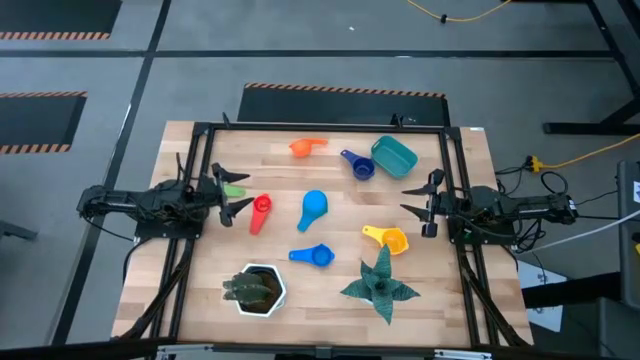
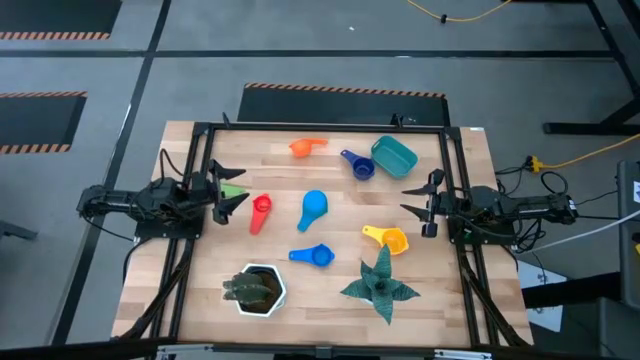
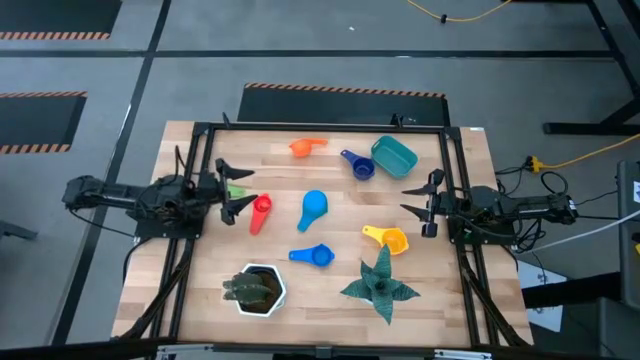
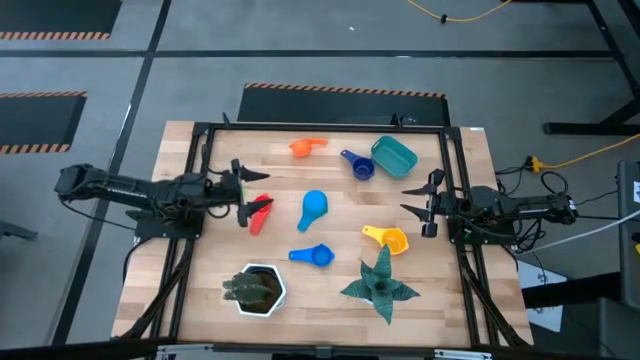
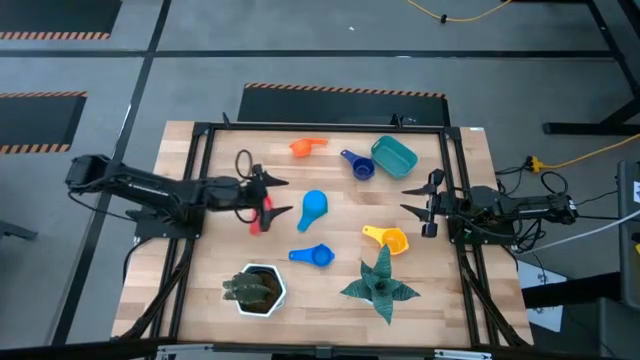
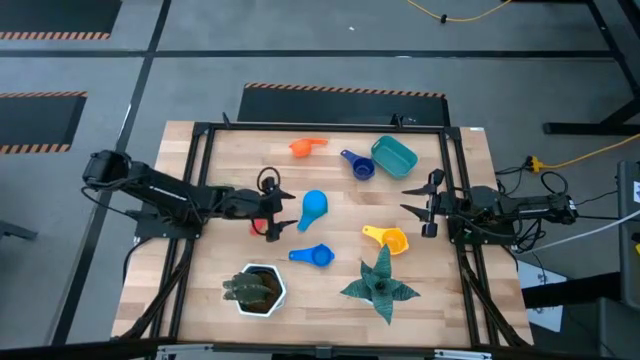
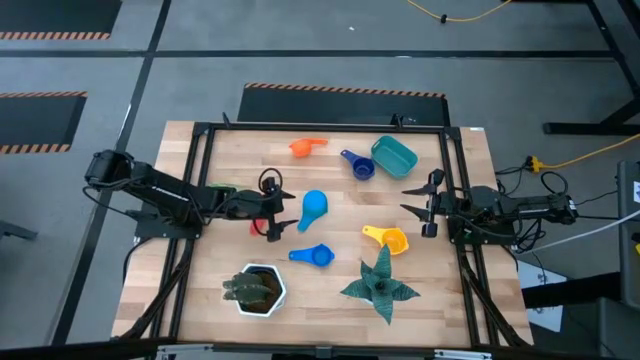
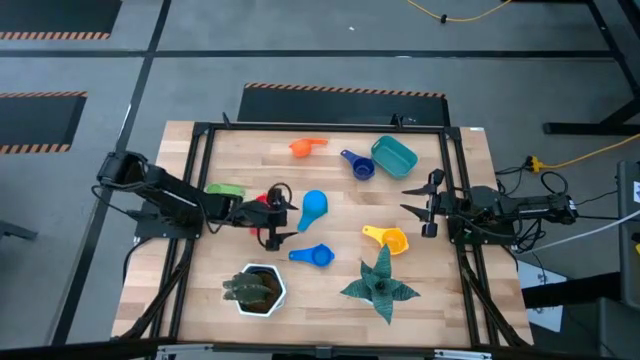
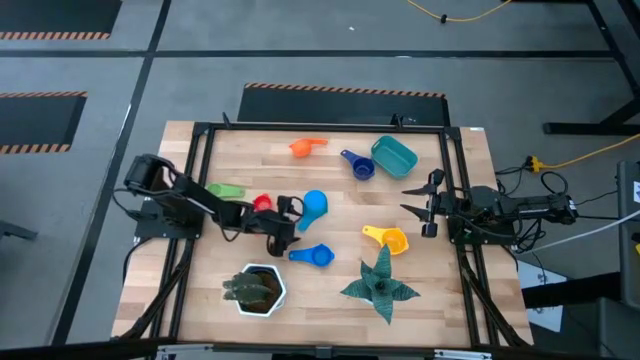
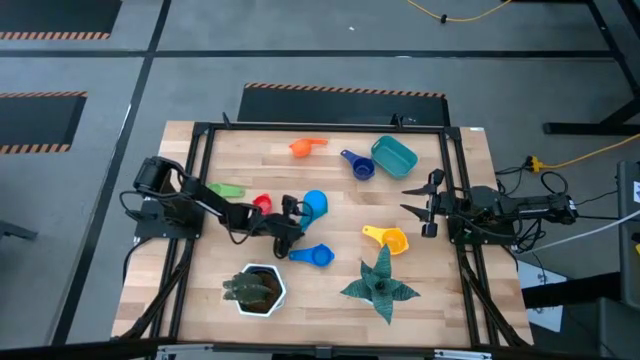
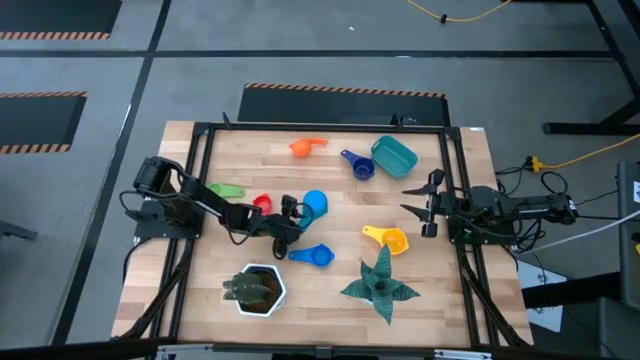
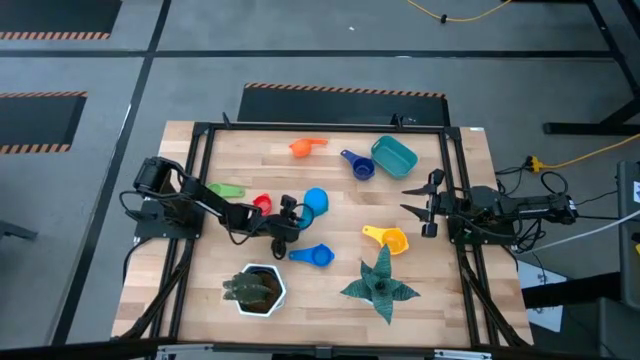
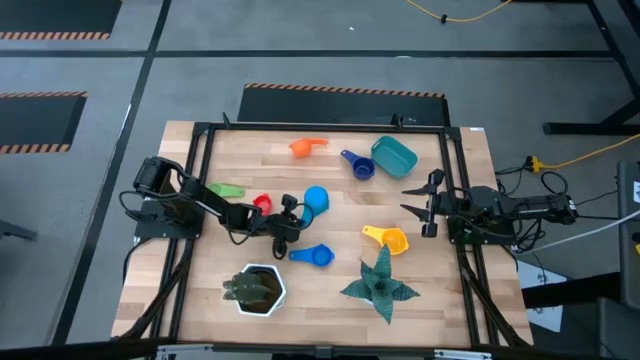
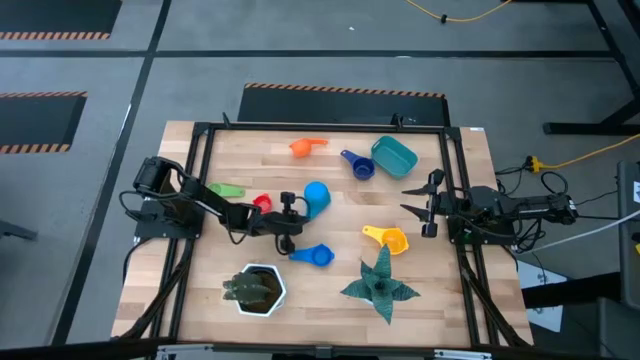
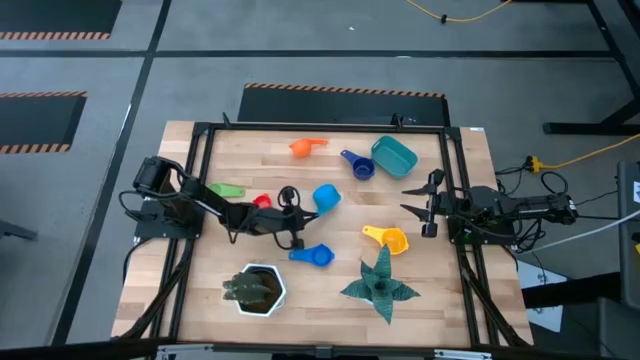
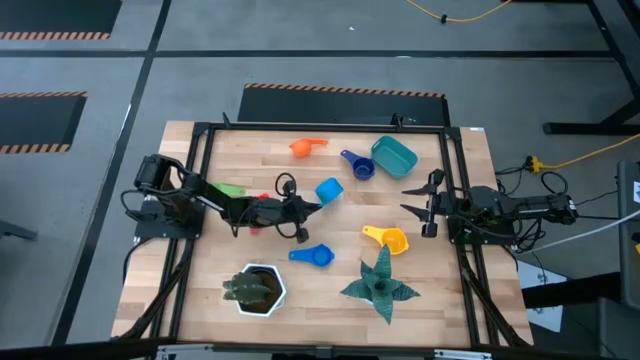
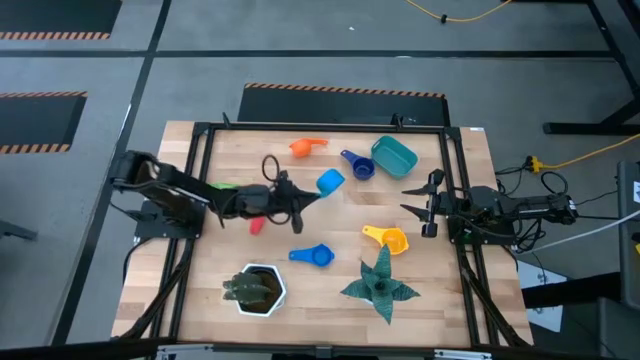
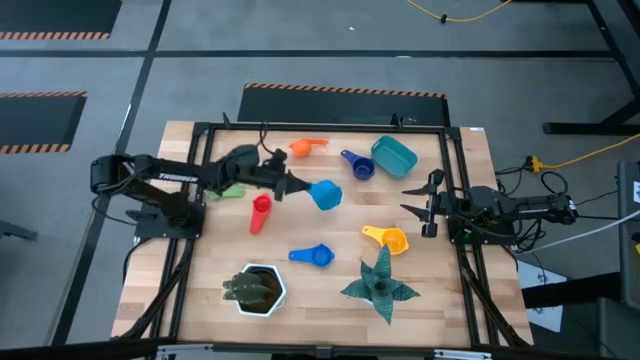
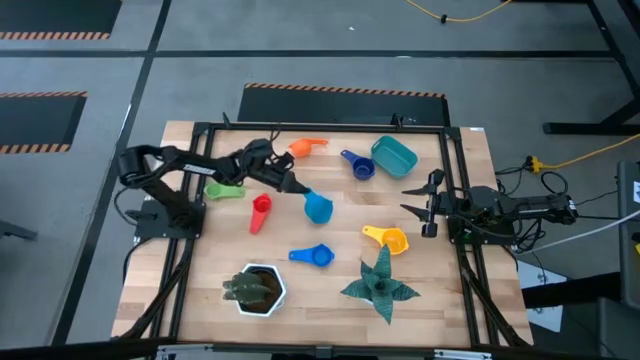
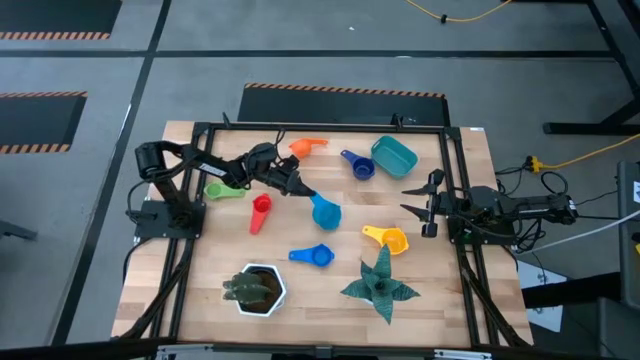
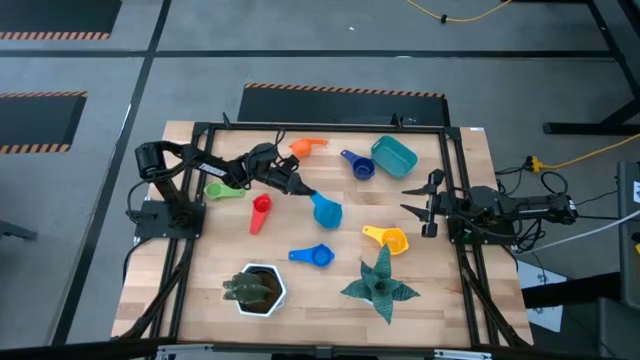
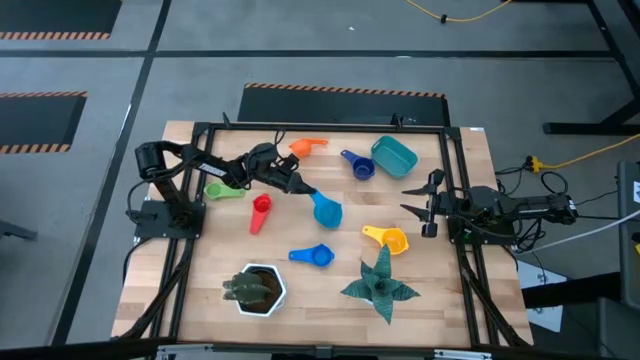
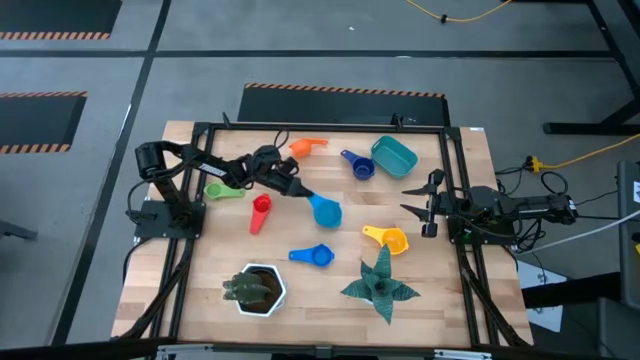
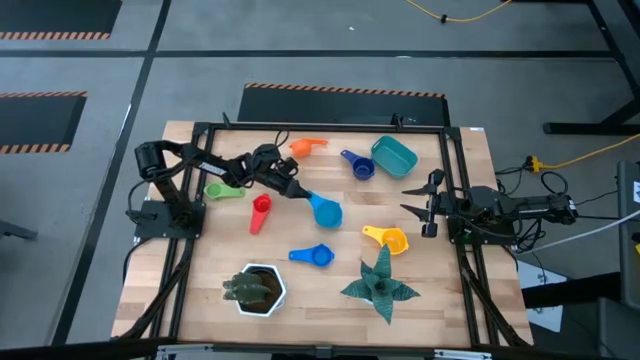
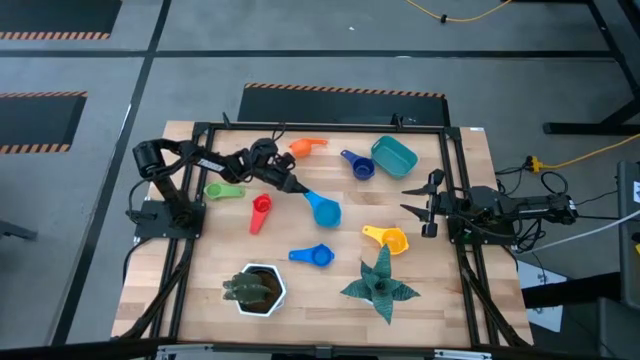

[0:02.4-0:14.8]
Task: Nest measuring cups in basket
Adjust the light blue measuring cup

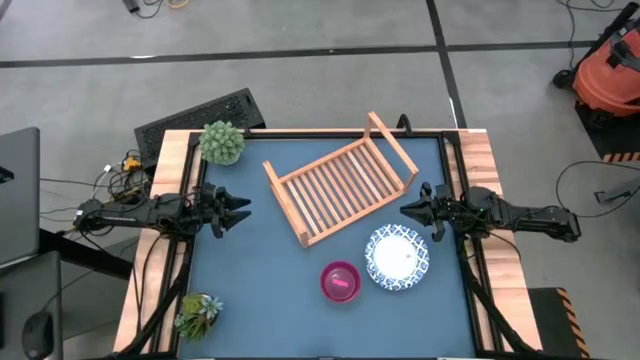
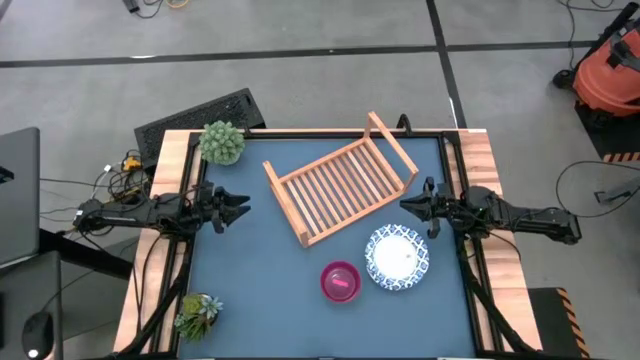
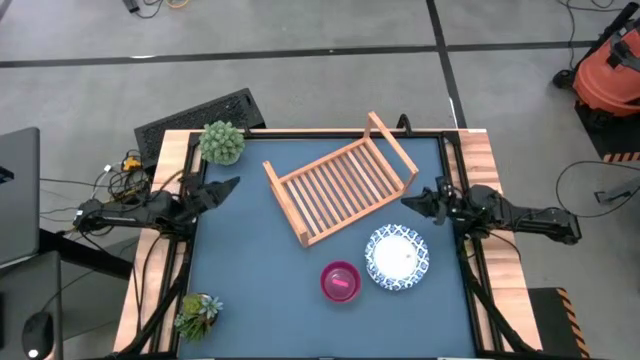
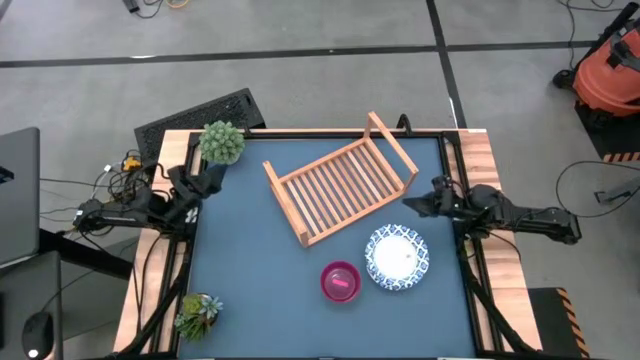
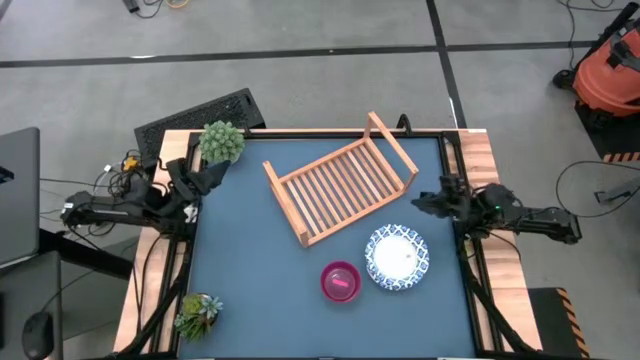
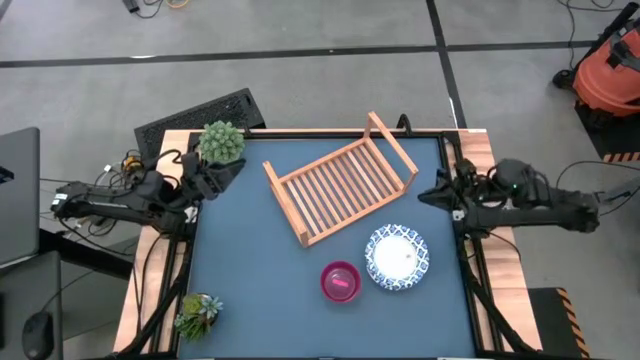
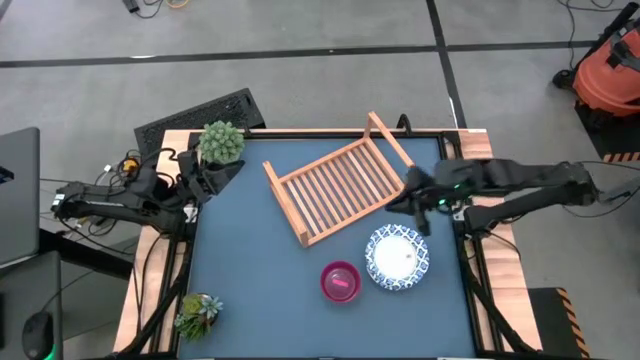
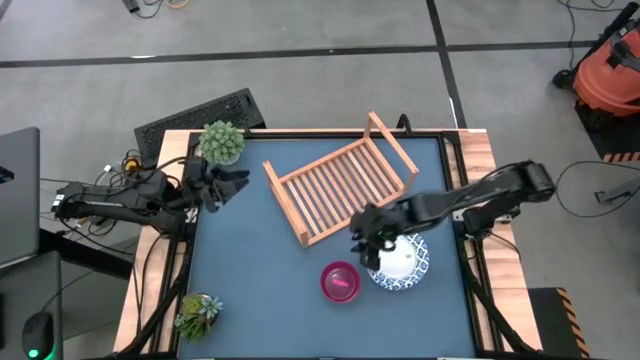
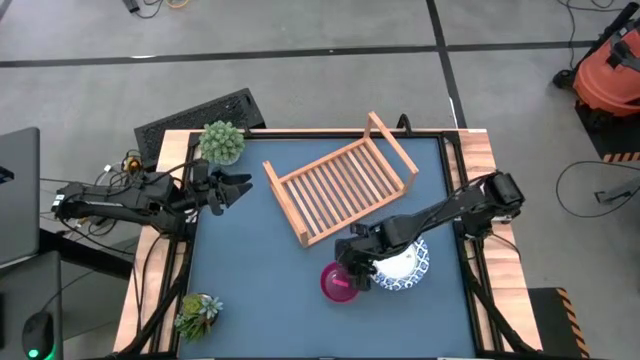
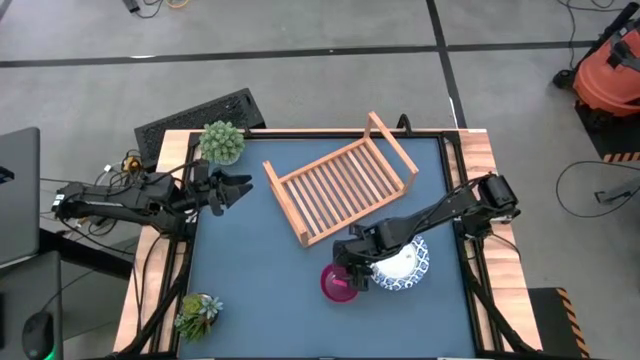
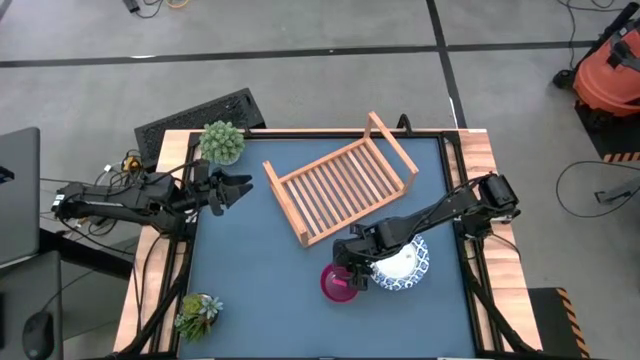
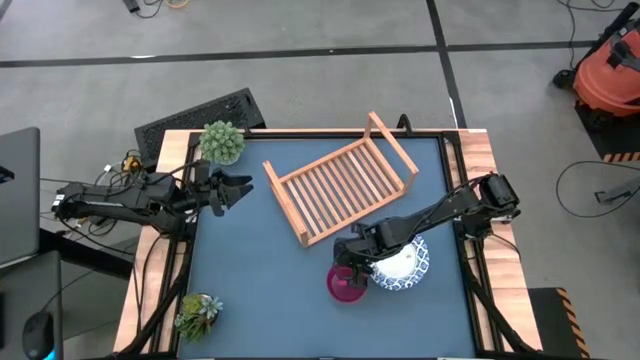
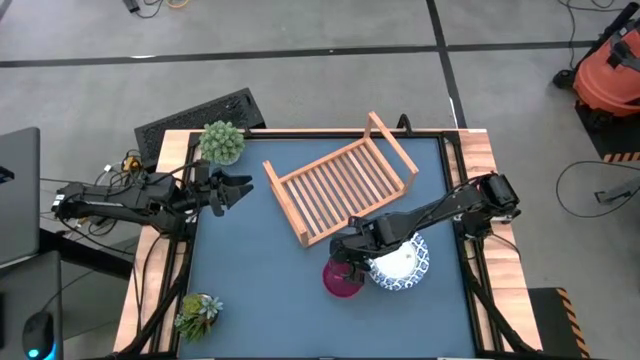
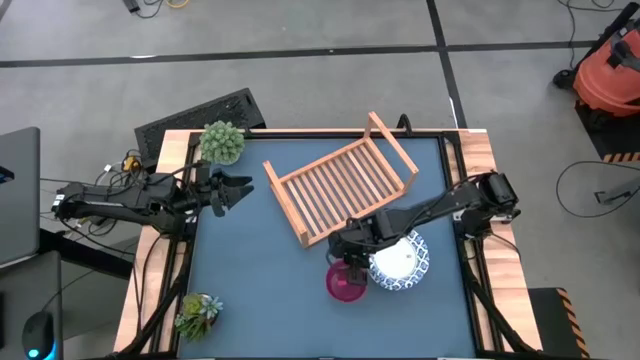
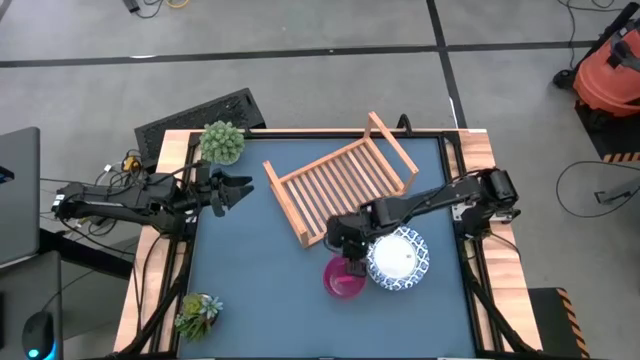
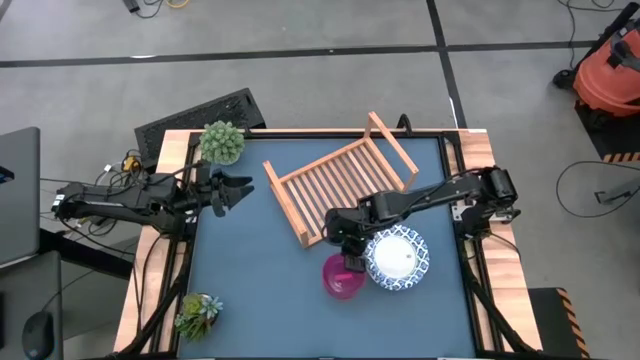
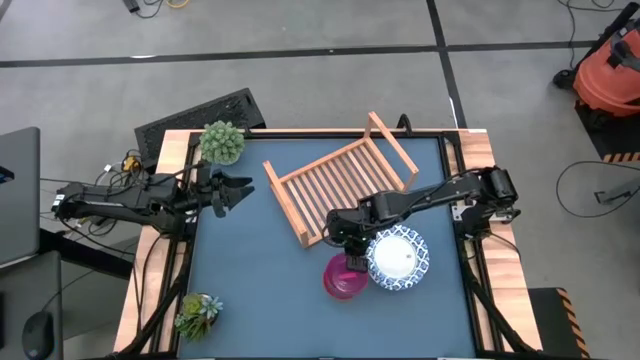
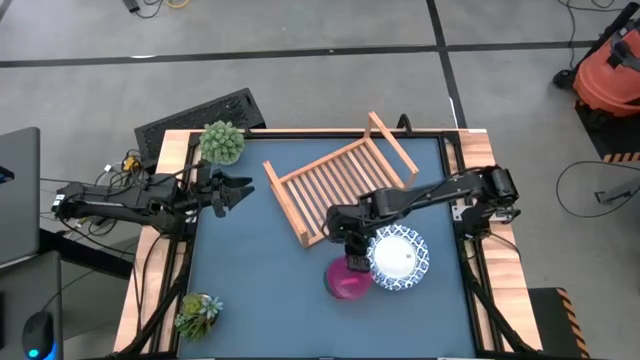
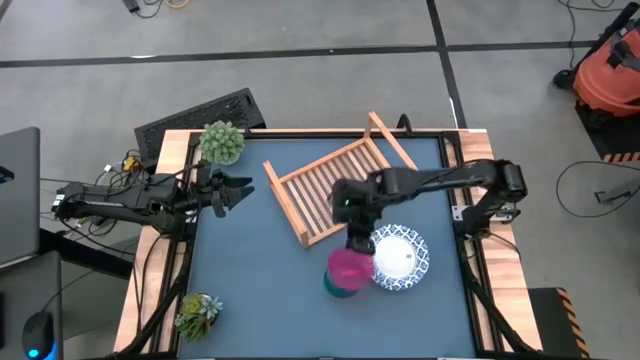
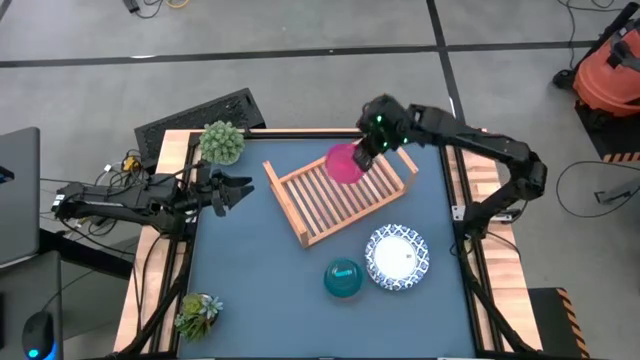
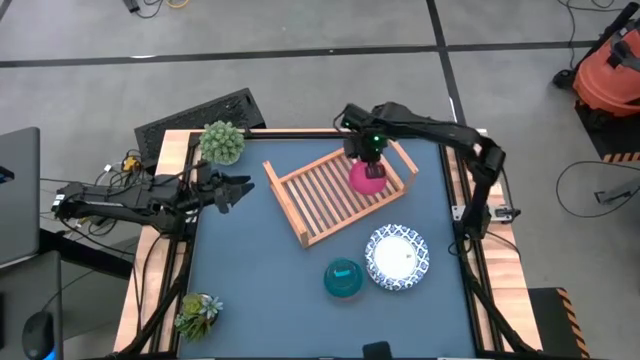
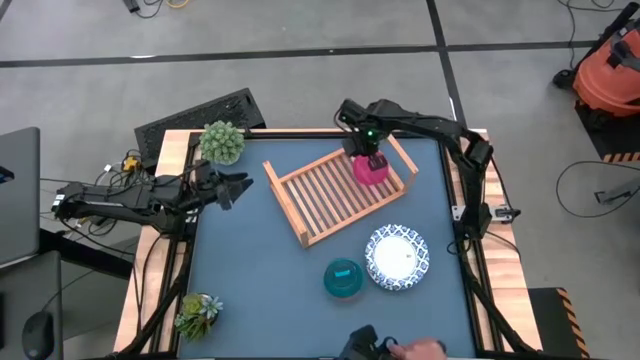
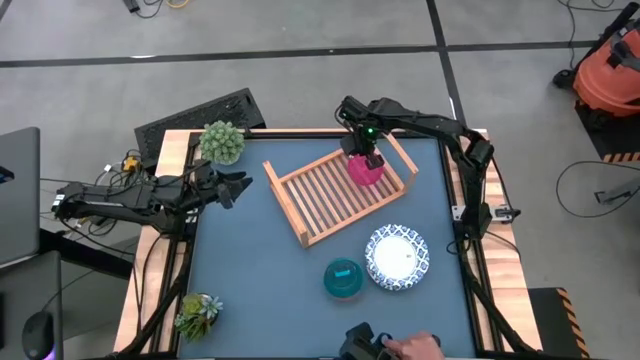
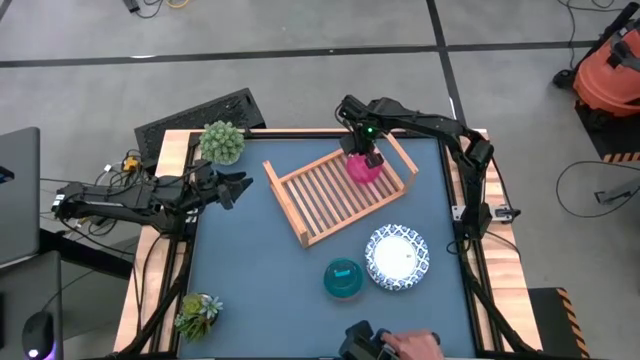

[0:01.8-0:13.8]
Task: Place and stack bowls onto a shelf
Put the pink bowl on the shelf
